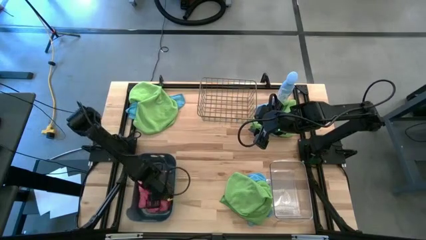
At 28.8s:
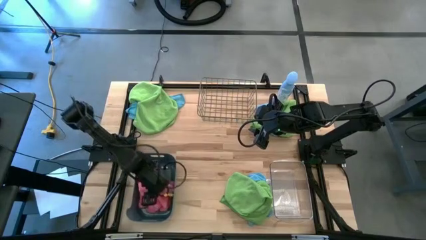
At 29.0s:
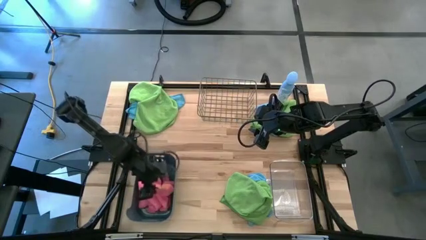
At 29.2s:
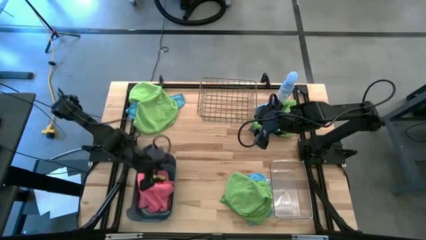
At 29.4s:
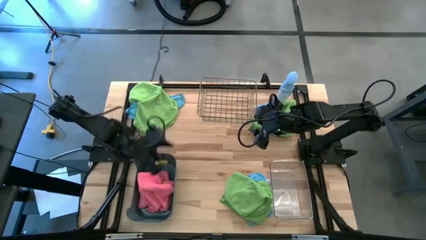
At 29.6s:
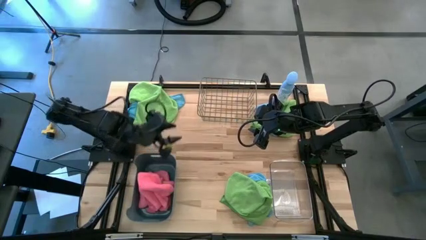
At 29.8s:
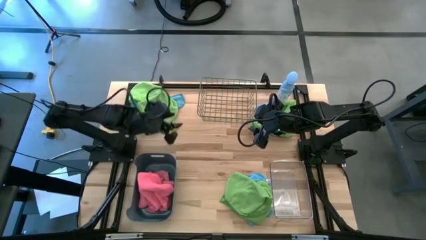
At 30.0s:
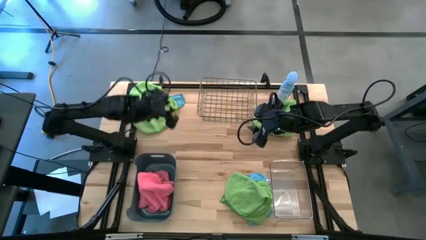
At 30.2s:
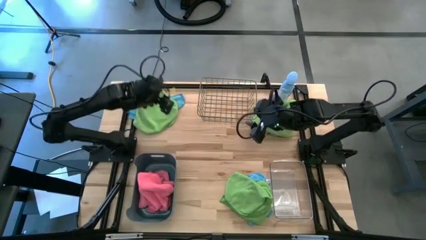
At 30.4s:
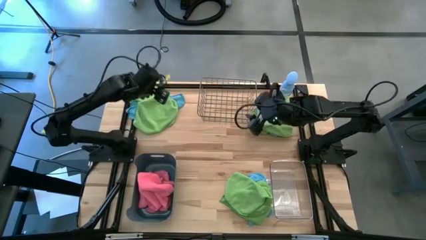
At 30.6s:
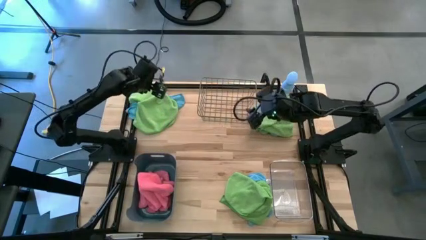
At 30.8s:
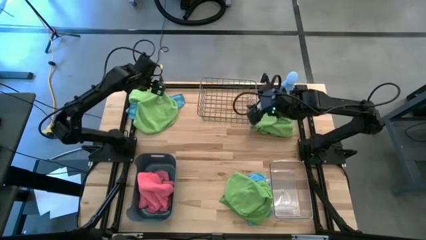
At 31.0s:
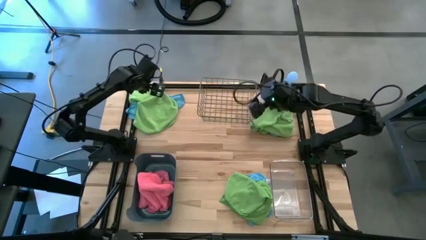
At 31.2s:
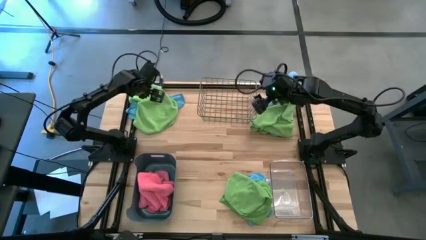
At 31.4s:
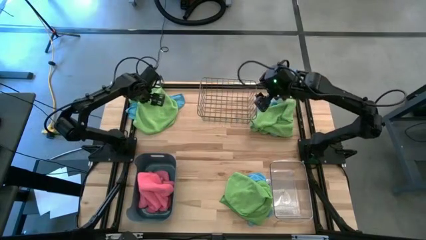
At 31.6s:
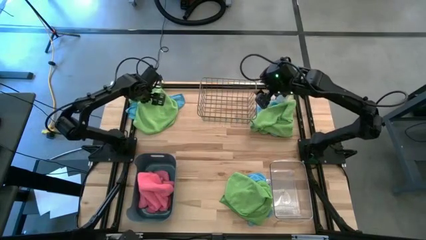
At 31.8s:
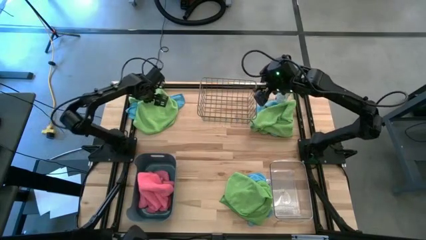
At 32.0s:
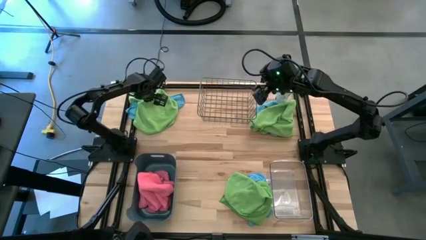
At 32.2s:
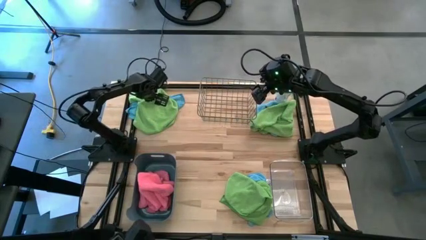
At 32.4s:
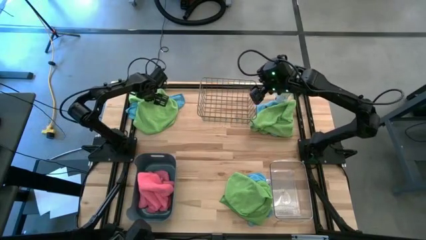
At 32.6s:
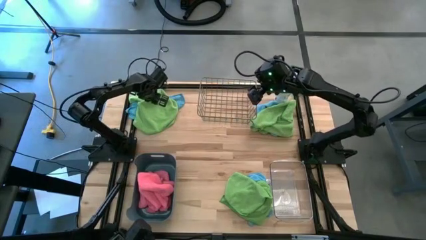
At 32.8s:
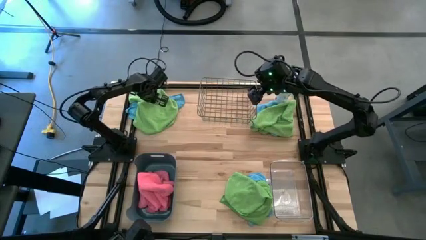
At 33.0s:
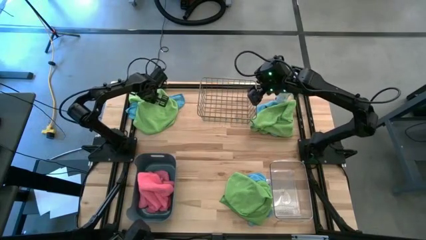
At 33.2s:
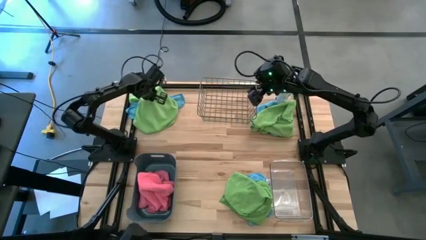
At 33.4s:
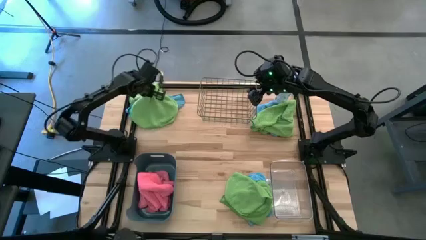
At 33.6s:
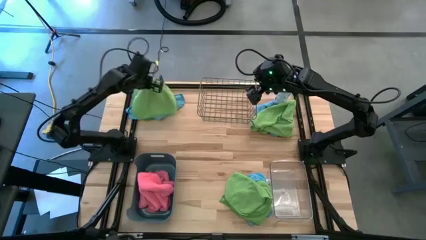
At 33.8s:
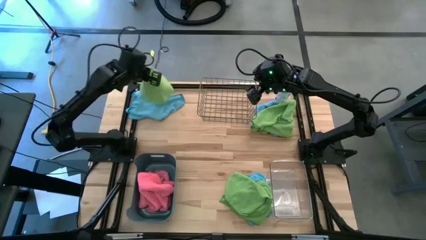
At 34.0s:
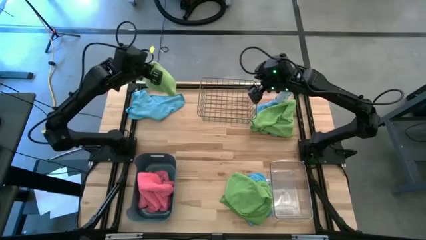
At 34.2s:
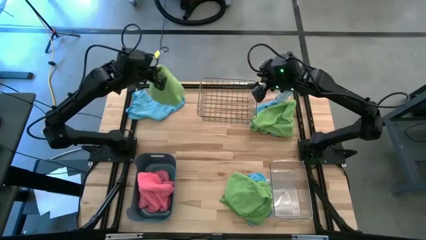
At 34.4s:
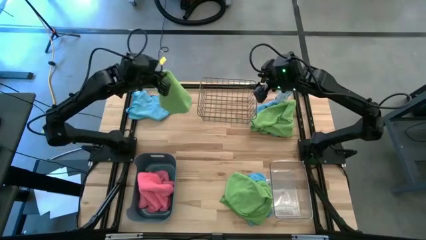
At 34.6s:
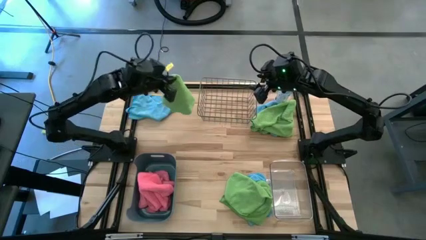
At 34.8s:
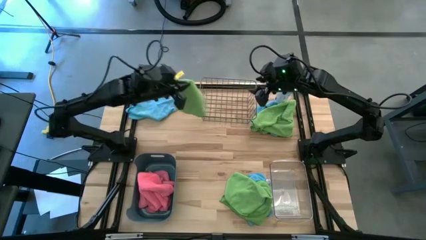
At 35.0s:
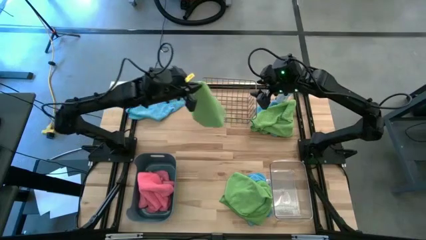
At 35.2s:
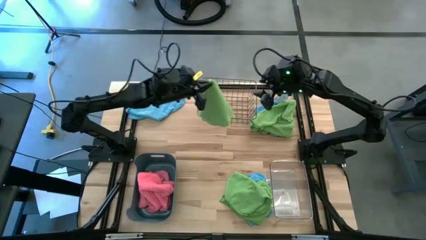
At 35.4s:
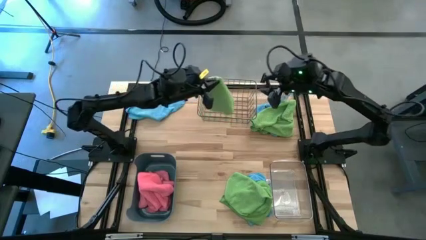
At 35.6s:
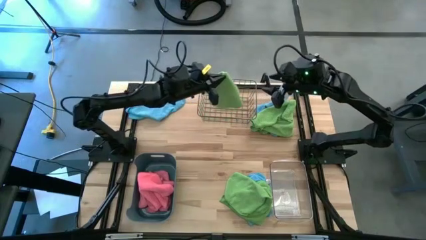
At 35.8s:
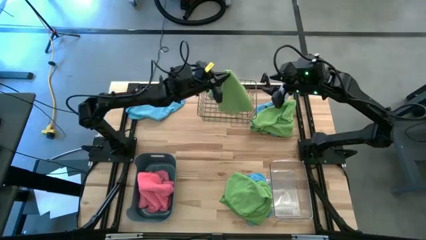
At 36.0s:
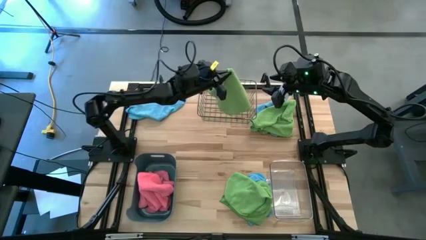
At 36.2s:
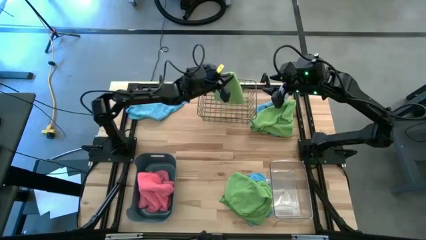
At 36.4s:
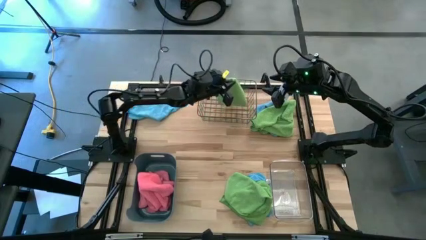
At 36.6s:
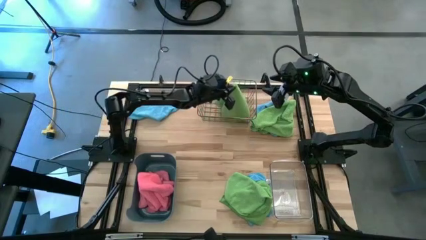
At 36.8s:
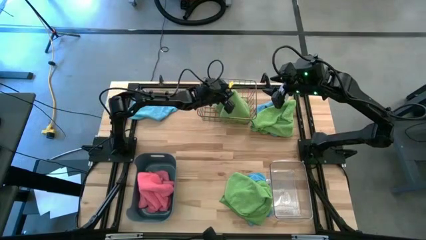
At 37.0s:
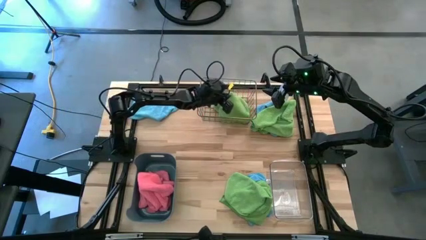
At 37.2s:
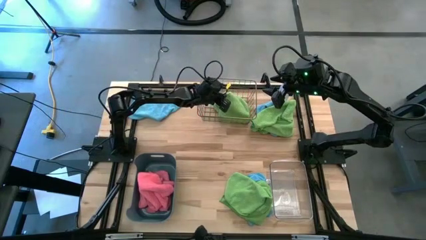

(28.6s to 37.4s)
Task: Sort microfiber towel by color & place in baskets
Put the top left green towel into the wire basket

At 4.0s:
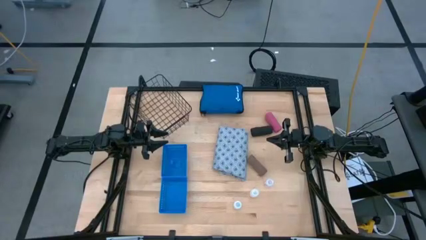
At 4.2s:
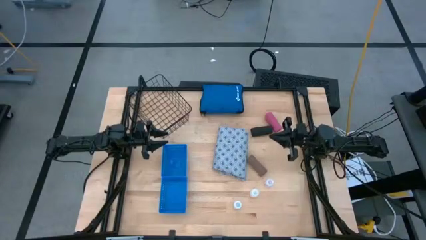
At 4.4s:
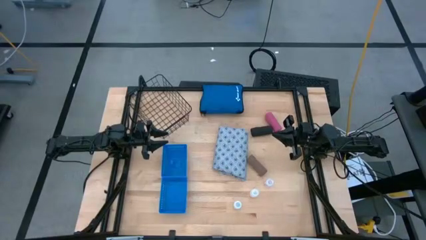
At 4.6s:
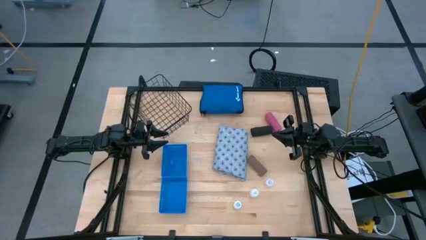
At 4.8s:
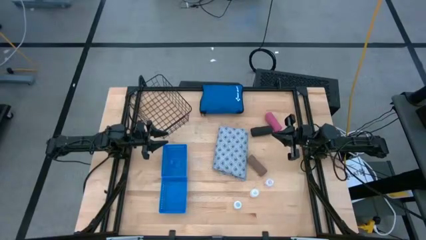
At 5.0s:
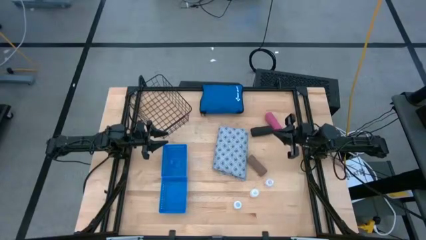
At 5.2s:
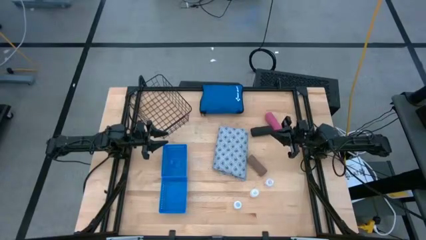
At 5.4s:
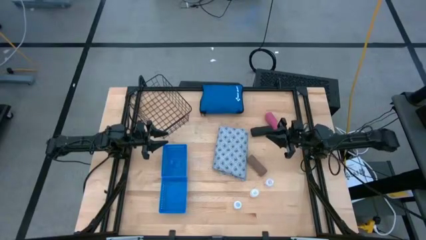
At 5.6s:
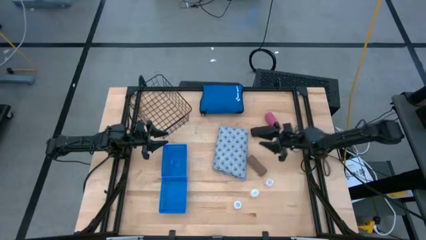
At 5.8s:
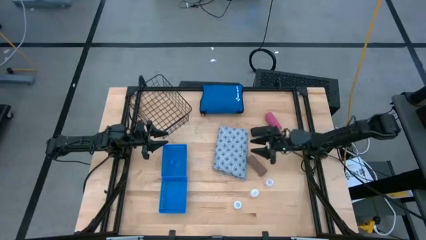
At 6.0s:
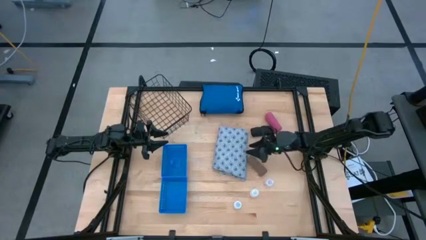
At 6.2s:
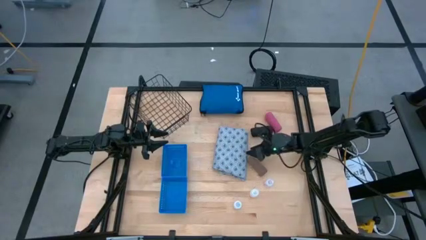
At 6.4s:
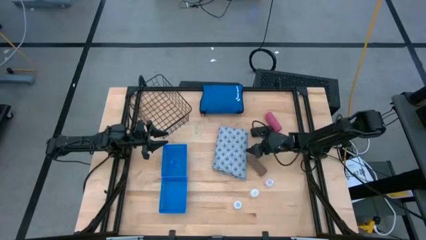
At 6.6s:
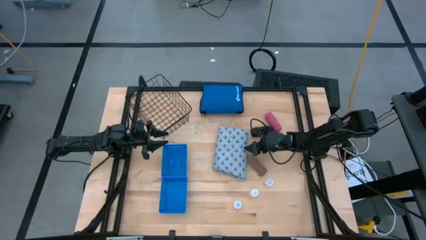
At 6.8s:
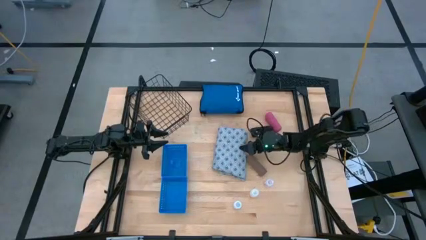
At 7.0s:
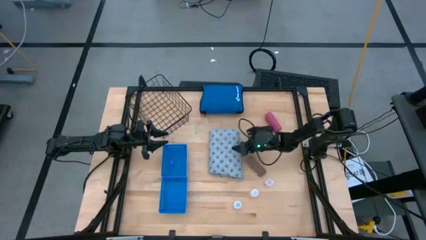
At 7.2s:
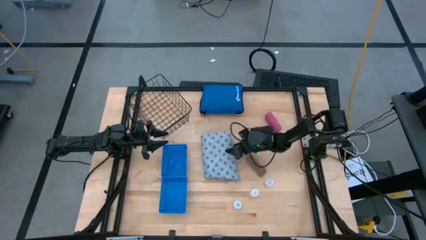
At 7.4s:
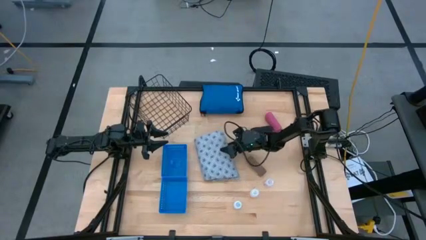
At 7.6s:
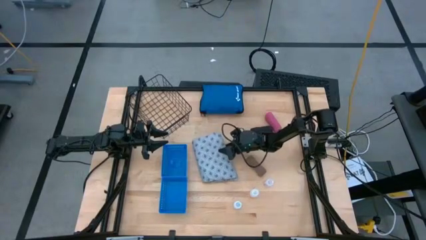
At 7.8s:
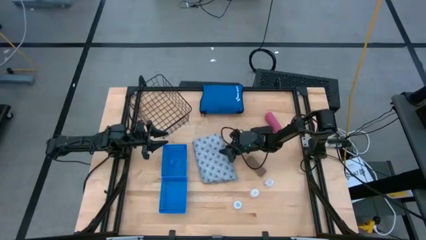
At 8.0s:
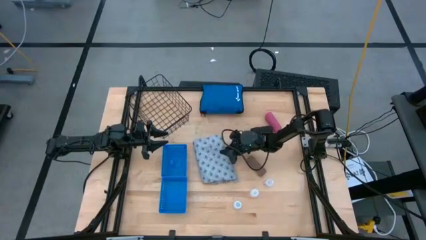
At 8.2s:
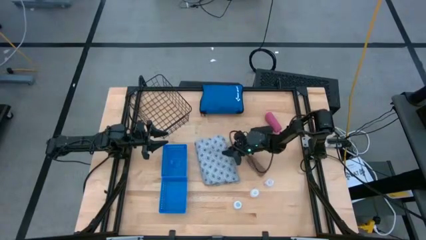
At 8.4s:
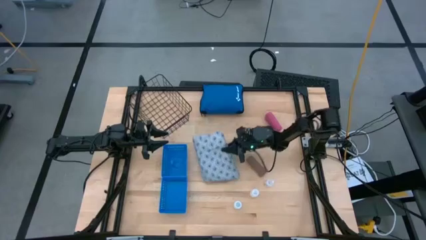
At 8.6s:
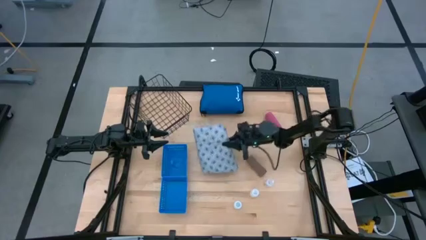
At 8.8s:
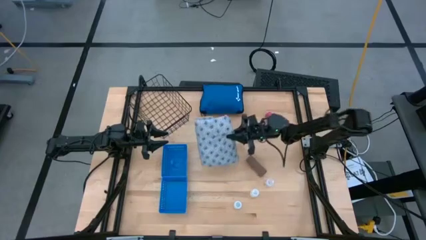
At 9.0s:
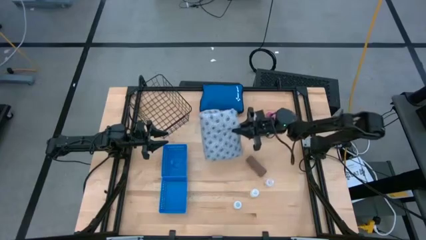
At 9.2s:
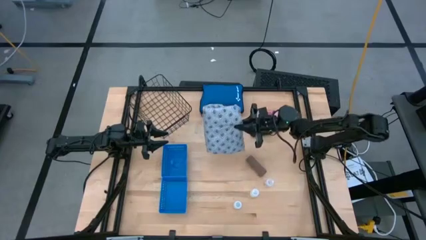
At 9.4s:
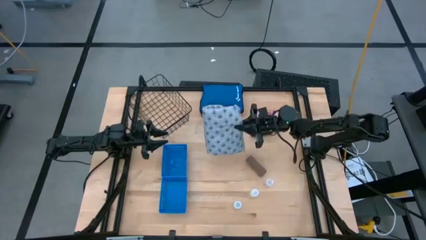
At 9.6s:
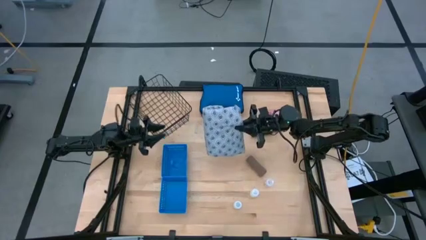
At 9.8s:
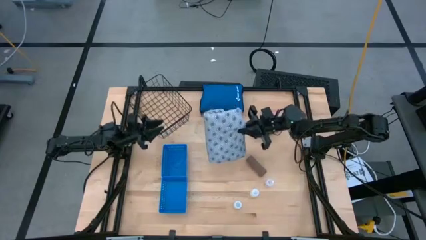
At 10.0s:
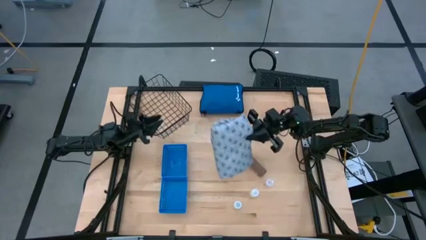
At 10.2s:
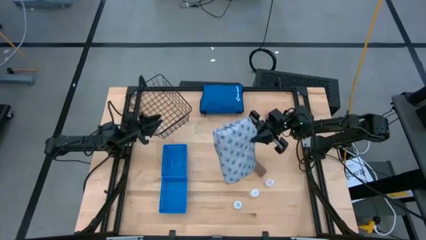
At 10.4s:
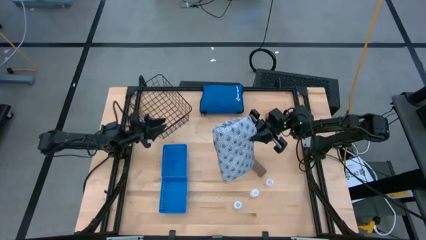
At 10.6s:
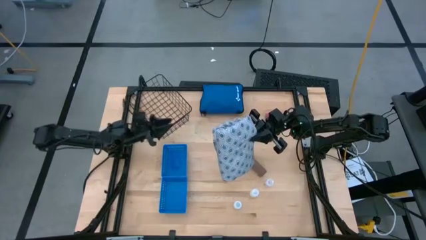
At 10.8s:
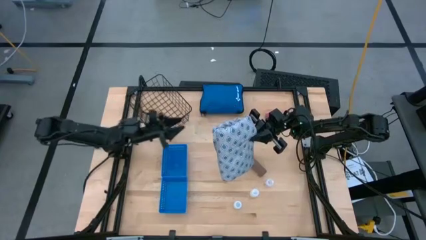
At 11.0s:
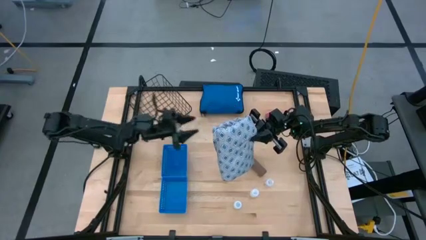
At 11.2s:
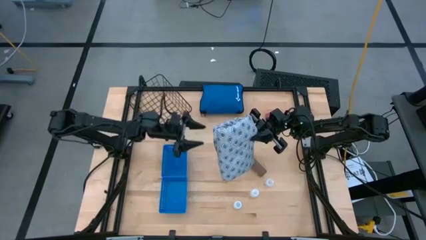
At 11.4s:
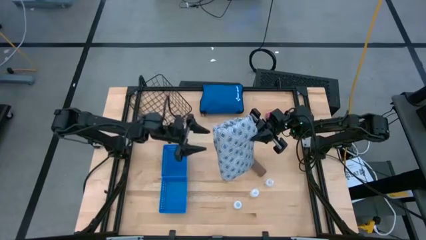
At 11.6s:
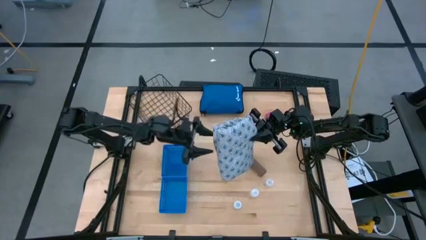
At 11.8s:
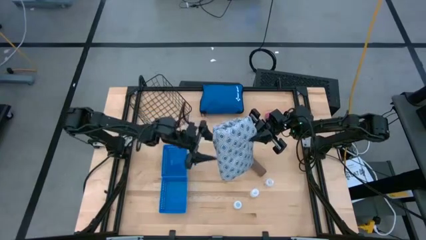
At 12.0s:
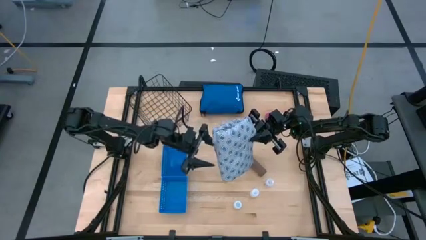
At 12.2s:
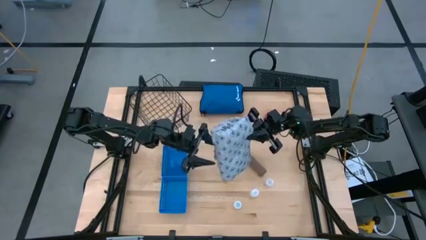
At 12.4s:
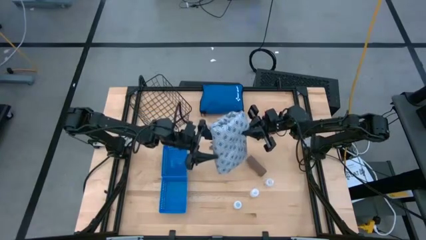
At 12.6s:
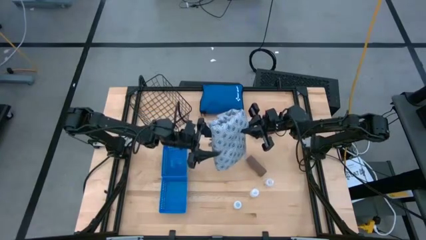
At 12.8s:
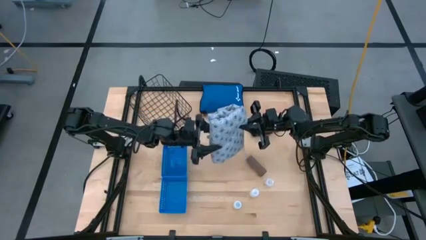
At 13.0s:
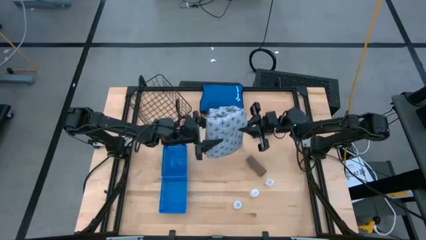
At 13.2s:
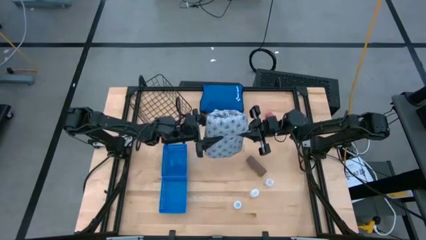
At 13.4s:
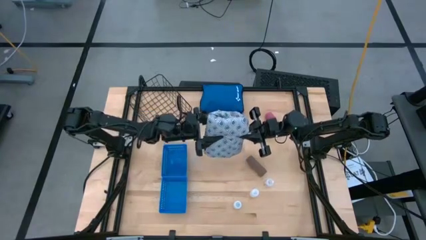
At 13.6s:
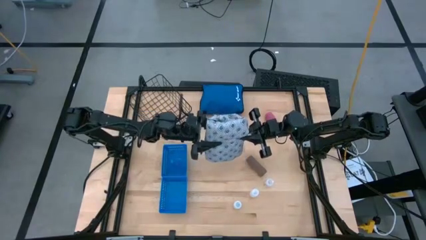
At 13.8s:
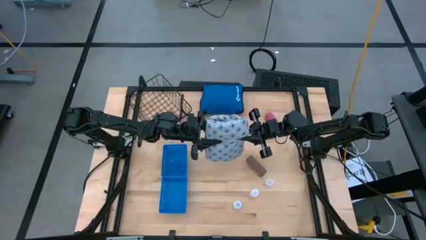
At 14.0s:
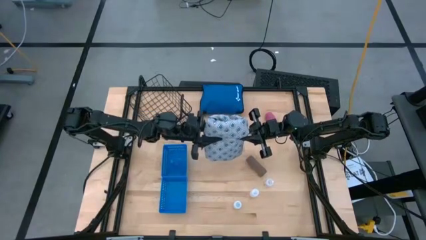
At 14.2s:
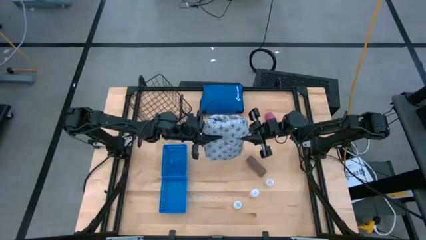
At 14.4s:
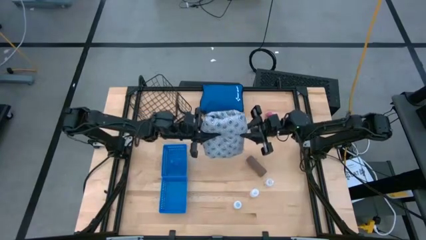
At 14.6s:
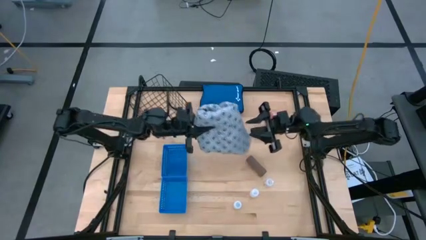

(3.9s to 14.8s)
Task: Pick & place medical supplies in basket/bin
Put the folded gray patient gown into the black wire basket
